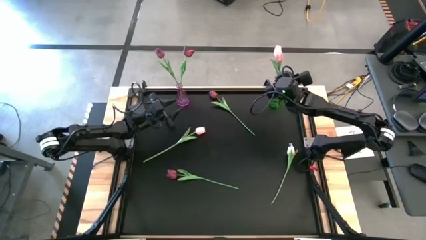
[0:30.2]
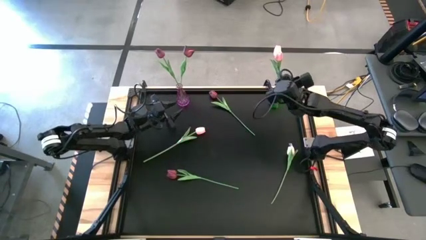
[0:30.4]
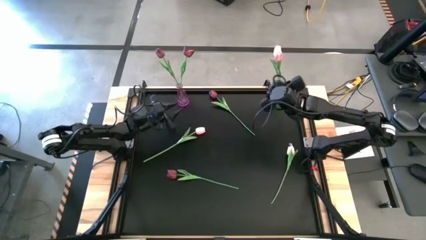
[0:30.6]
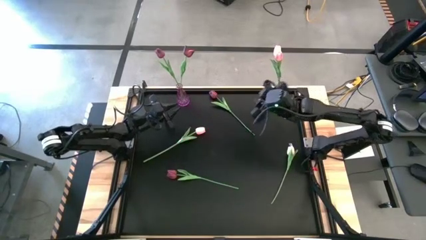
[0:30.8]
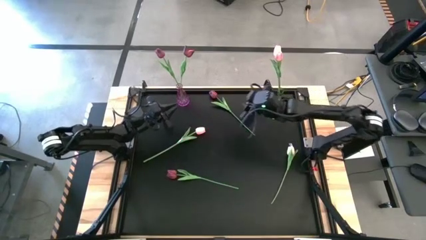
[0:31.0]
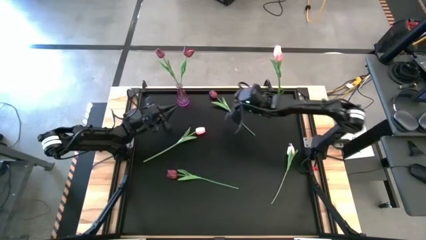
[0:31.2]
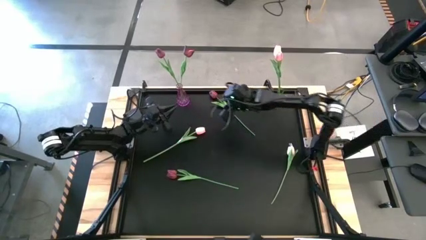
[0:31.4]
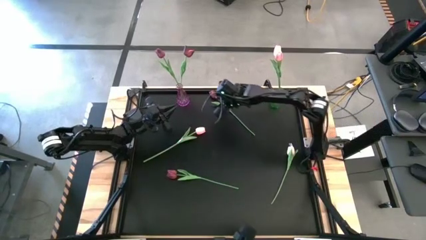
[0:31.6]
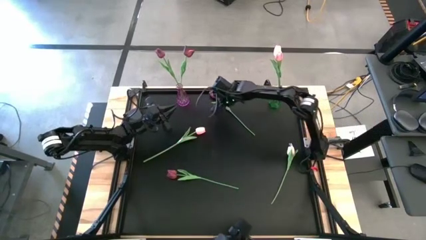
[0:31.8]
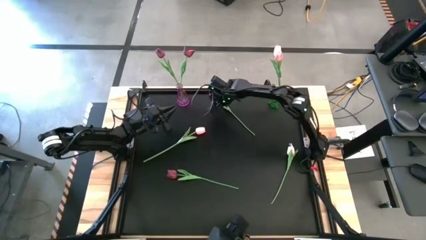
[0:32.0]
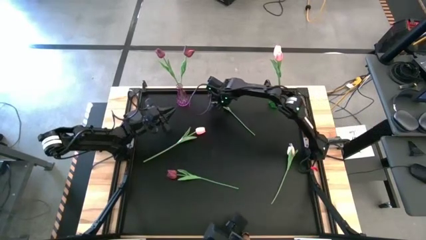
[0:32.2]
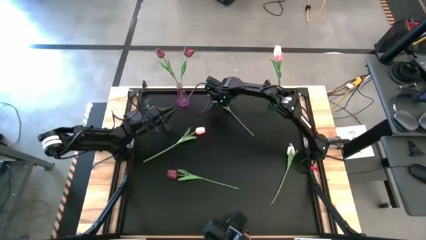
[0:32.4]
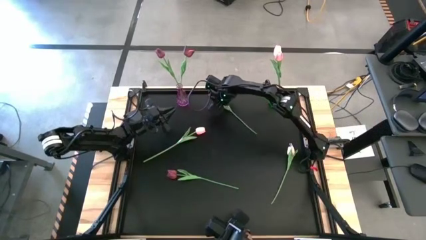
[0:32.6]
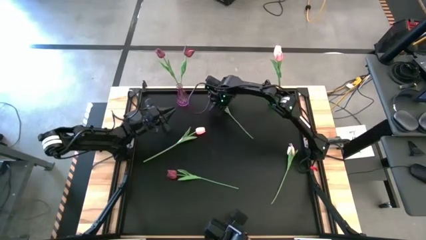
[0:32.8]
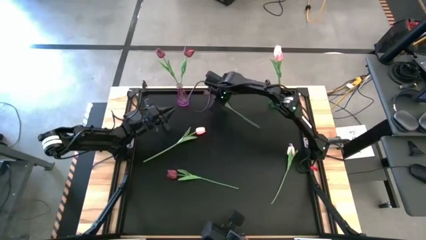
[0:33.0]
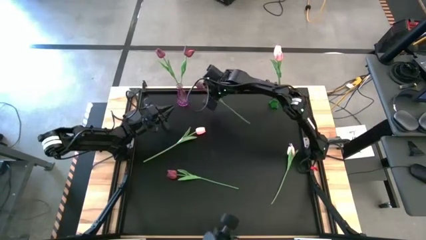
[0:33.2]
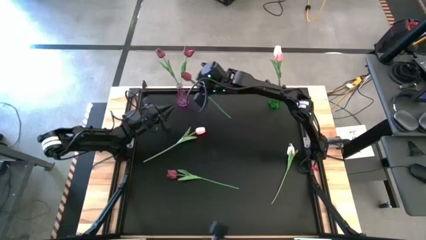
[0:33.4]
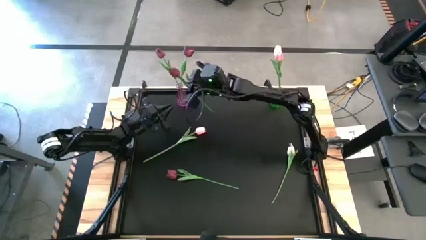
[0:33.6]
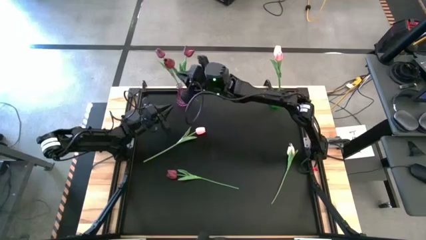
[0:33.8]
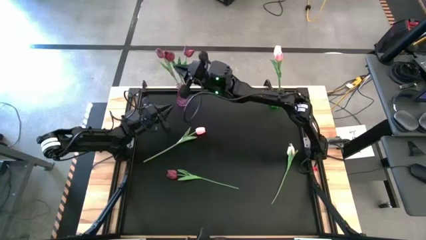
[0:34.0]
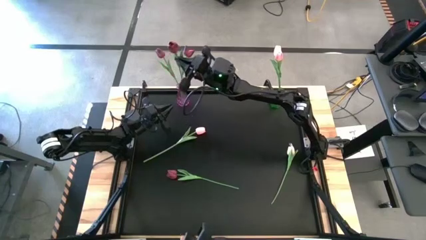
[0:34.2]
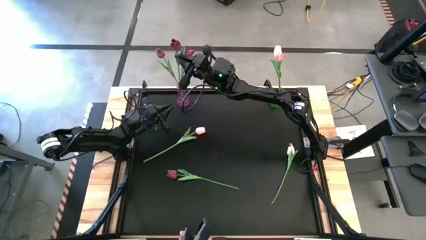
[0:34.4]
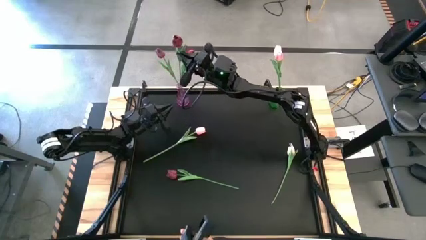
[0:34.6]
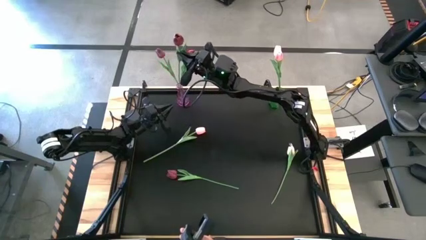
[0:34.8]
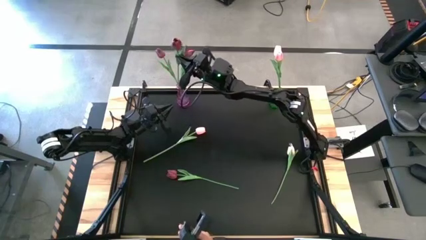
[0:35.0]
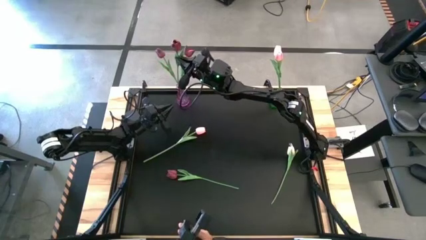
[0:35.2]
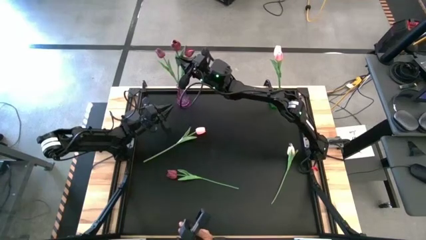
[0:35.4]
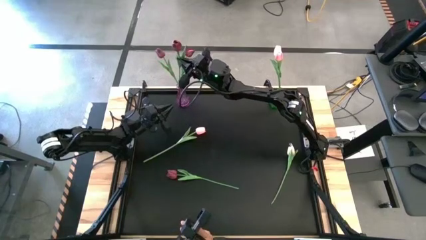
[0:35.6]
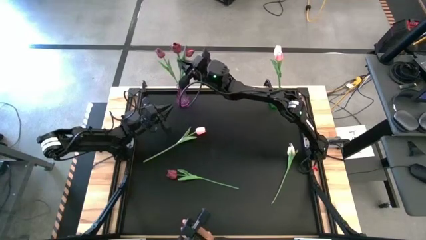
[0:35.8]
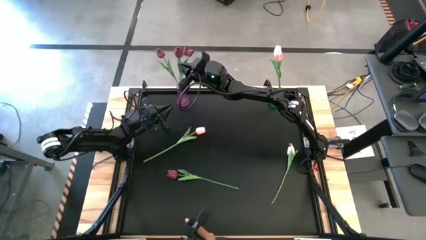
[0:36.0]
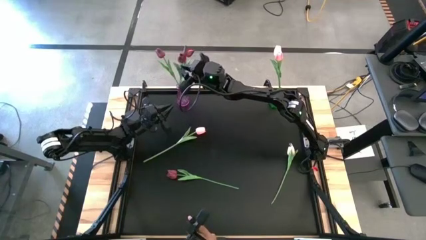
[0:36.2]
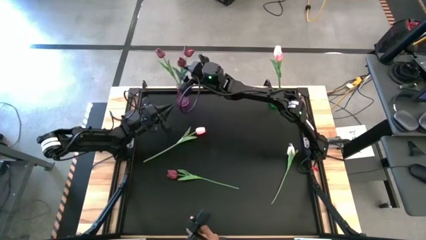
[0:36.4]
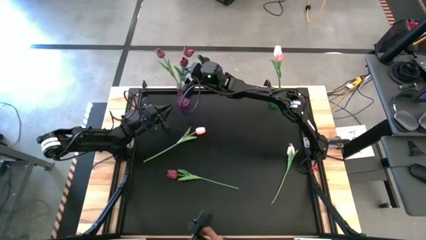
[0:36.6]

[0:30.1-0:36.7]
Task: Sort flowers into vase by color
Put the top red flower into the purple vase

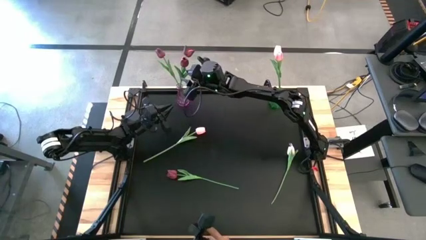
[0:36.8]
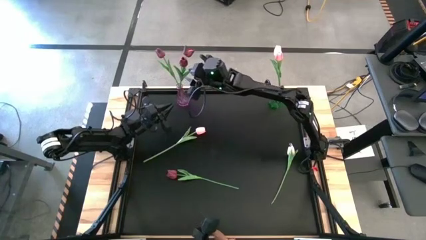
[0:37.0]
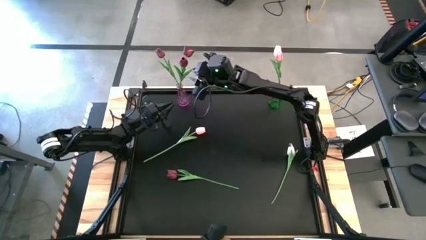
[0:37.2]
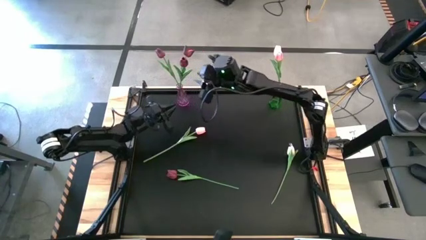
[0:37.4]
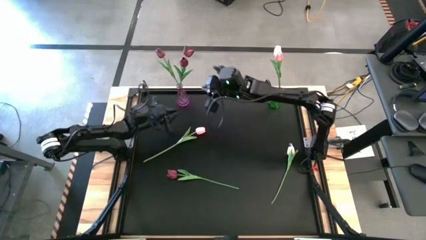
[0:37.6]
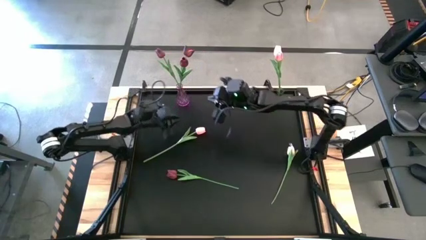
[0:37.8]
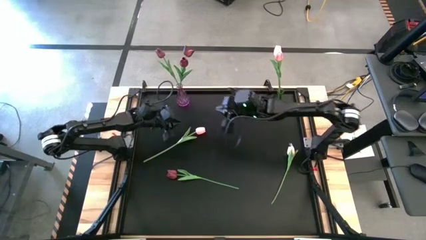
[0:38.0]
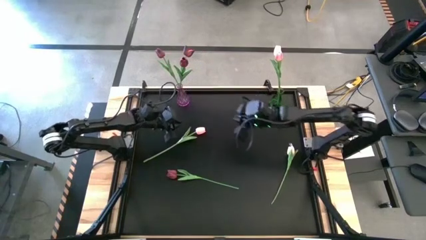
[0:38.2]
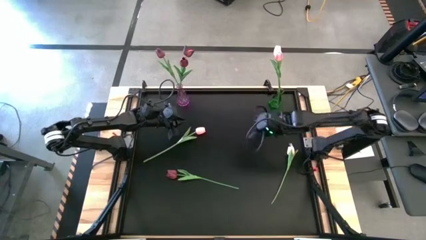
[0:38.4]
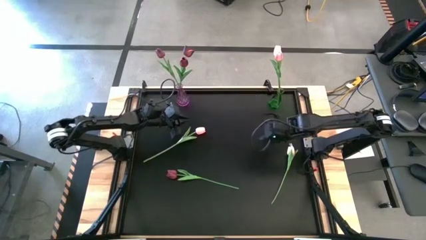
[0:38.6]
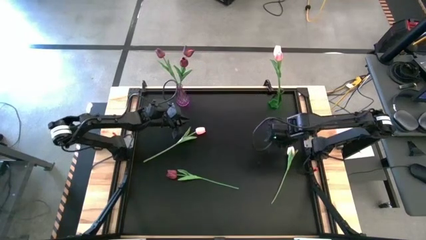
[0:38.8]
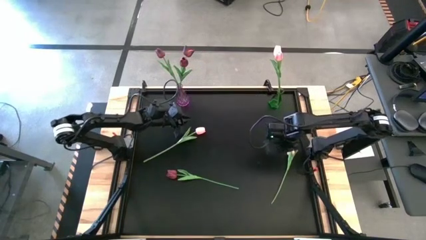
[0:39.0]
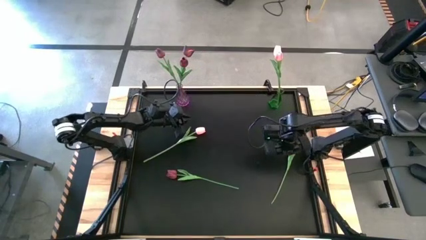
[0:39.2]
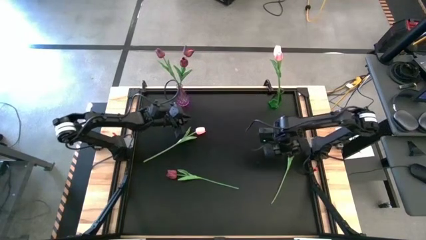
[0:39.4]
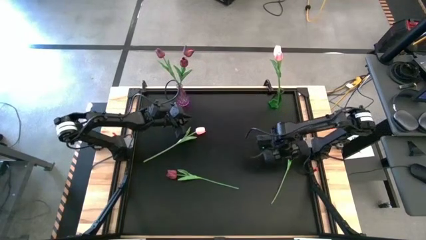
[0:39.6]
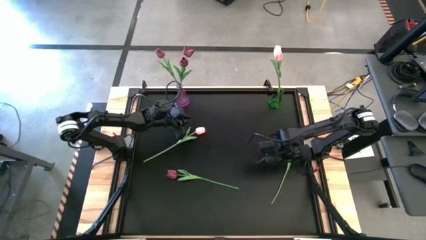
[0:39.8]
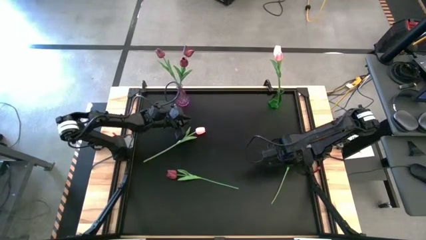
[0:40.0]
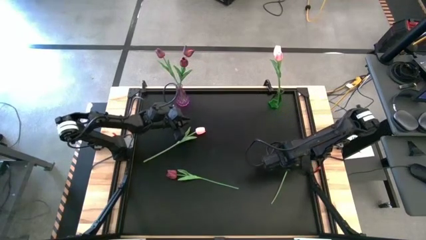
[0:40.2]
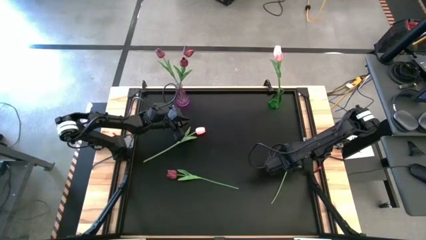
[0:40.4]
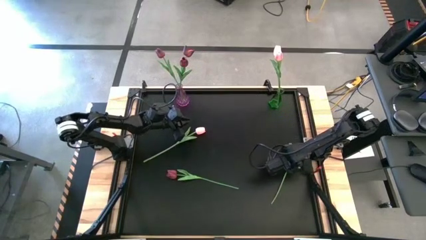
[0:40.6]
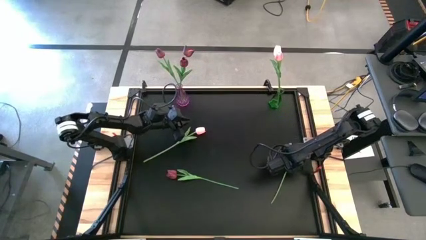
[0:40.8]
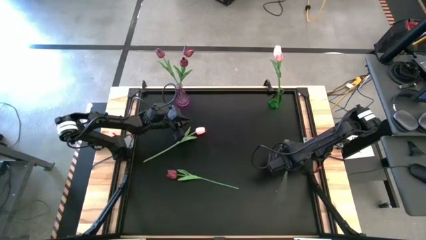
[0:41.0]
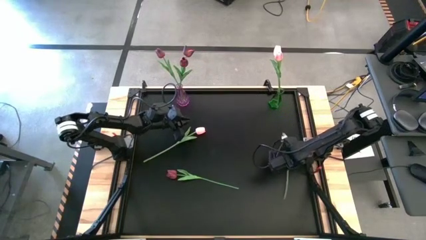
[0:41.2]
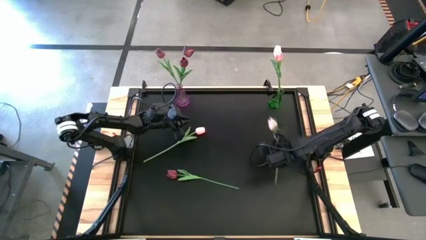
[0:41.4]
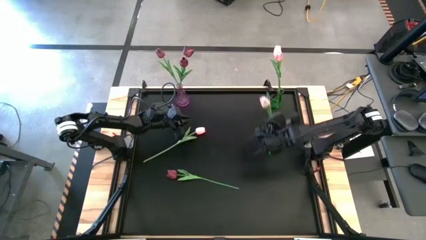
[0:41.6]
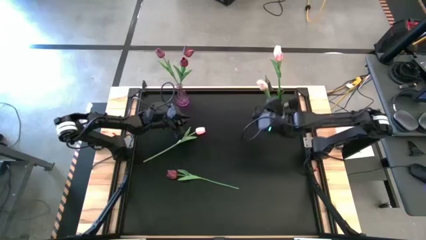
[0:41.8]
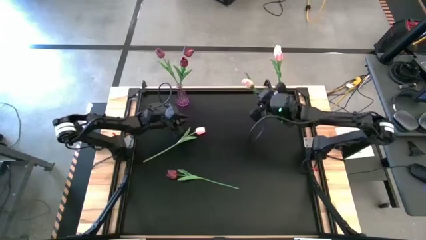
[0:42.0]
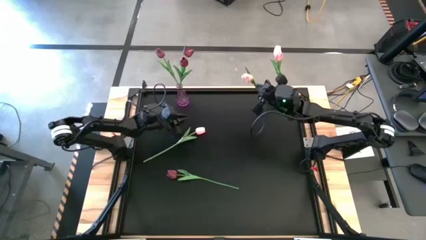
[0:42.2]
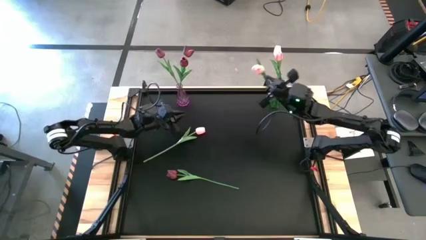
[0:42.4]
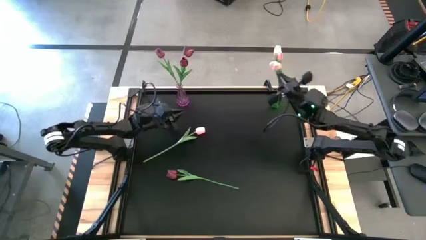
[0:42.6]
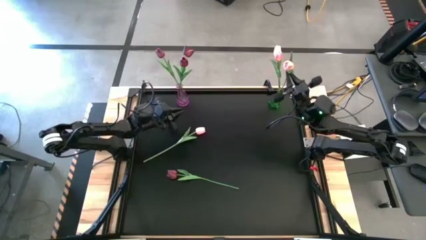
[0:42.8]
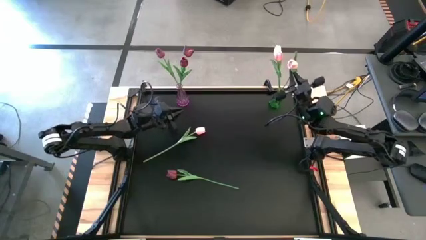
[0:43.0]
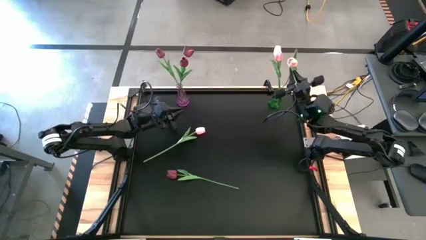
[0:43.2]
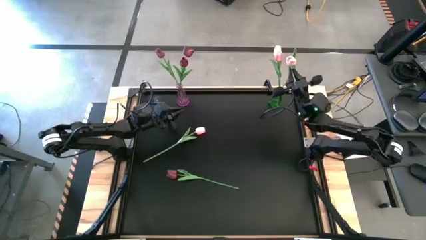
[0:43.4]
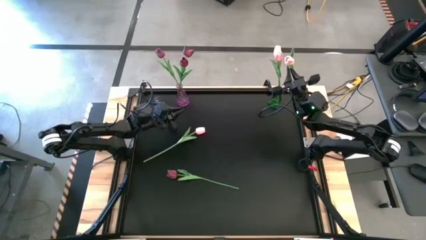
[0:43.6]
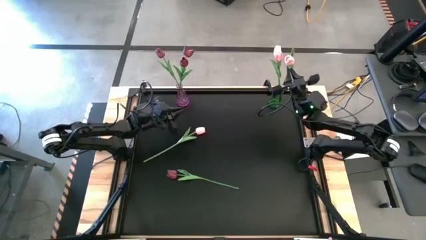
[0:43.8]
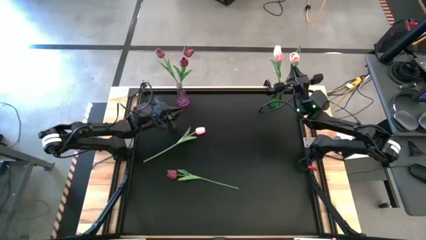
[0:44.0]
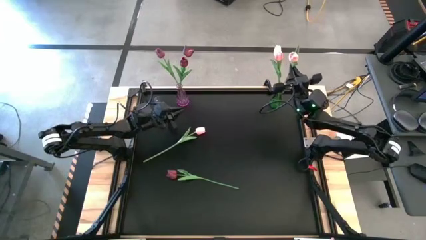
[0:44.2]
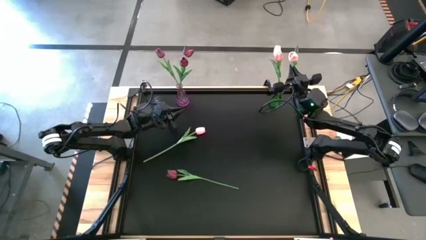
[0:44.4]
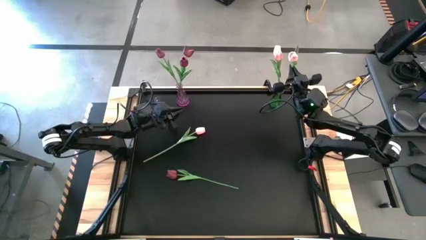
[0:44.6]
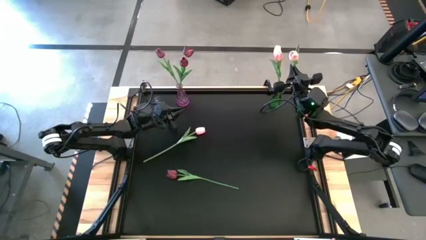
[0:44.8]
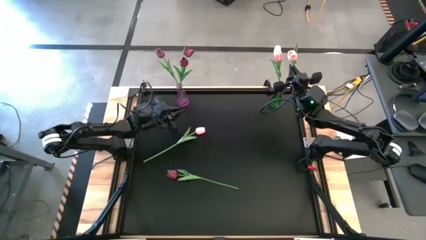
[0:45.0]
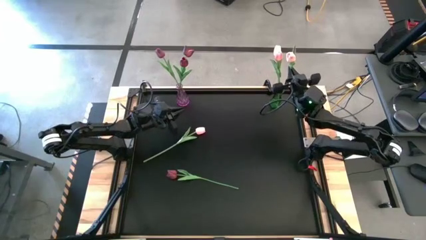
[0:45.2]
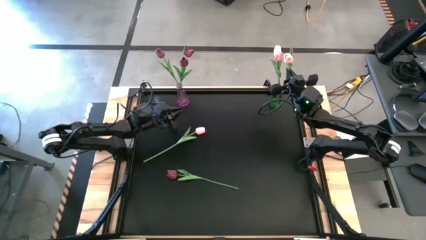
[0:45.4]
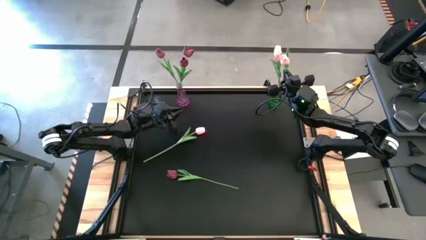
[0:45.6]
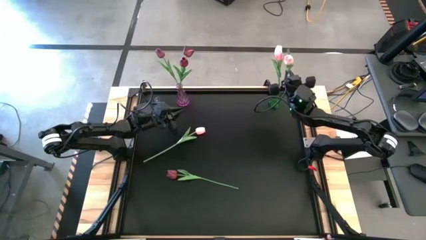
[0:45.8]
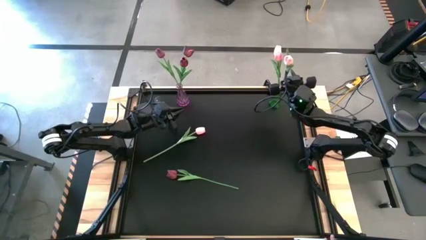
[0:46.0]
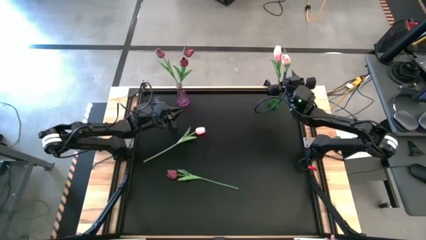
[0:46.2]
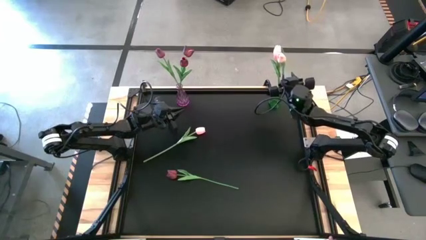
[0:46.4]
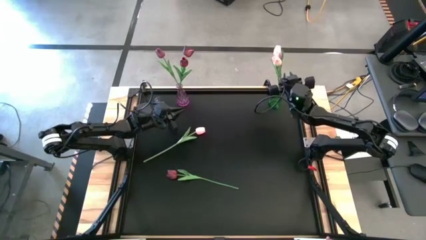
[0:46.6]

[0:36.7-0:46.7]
Put the right pink flower into the green vase
